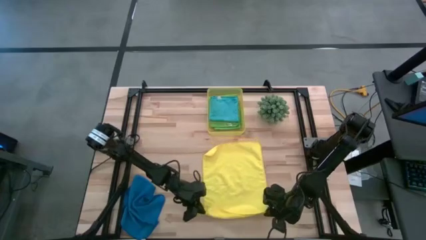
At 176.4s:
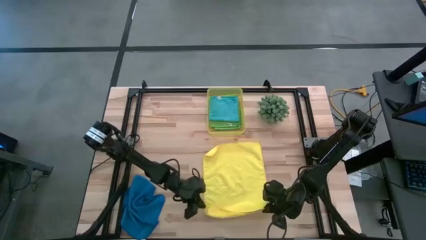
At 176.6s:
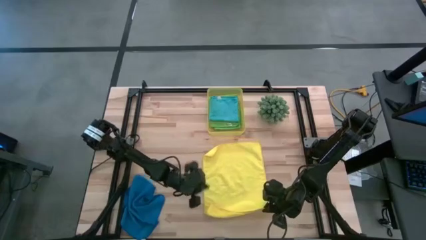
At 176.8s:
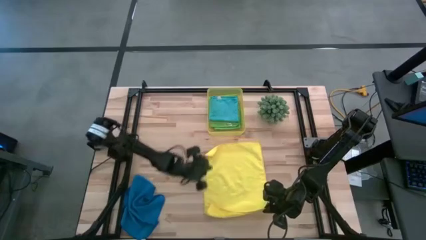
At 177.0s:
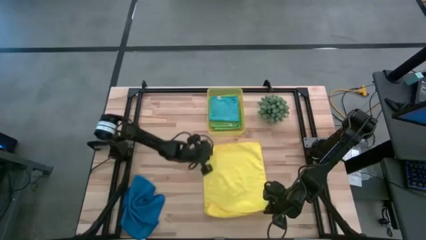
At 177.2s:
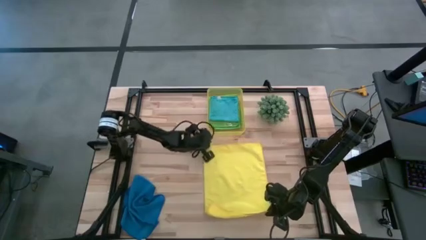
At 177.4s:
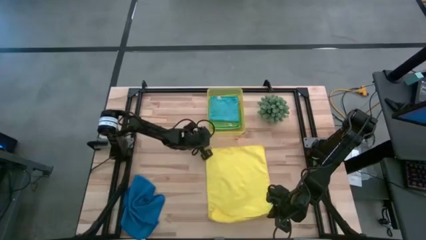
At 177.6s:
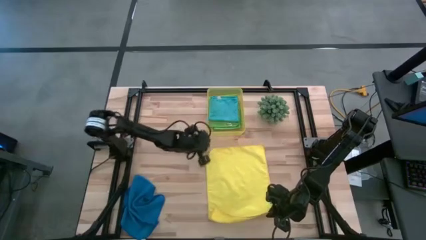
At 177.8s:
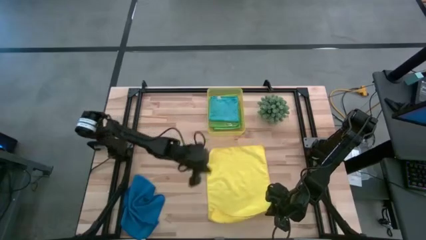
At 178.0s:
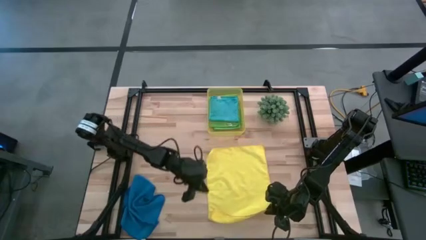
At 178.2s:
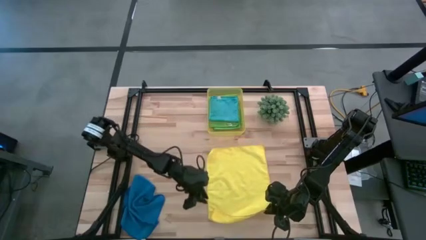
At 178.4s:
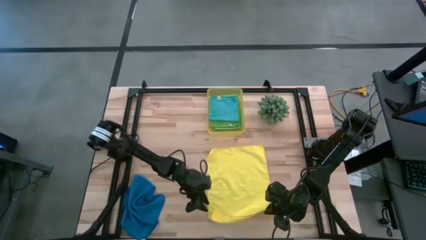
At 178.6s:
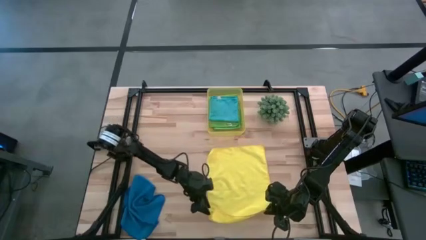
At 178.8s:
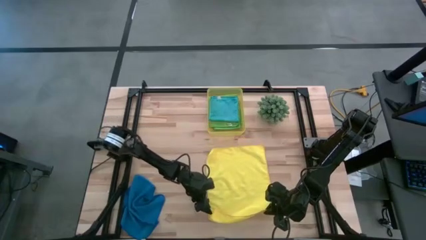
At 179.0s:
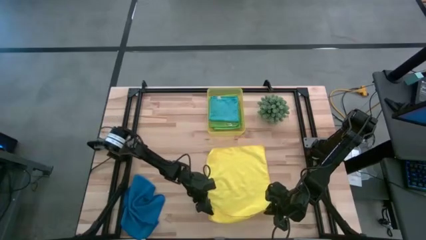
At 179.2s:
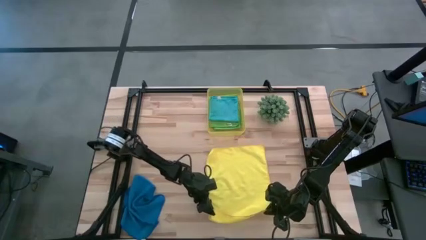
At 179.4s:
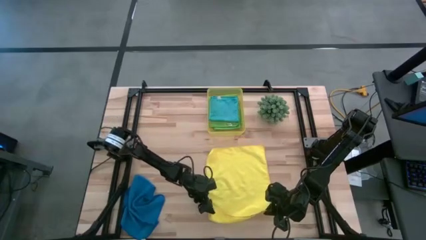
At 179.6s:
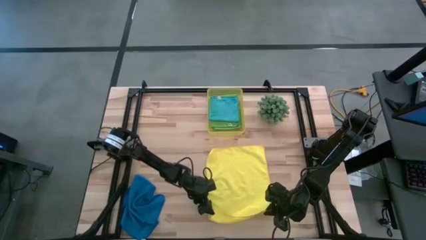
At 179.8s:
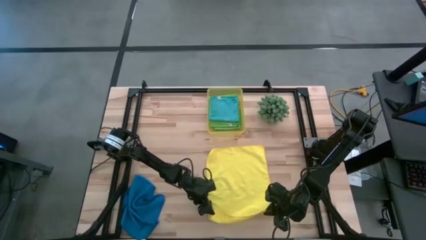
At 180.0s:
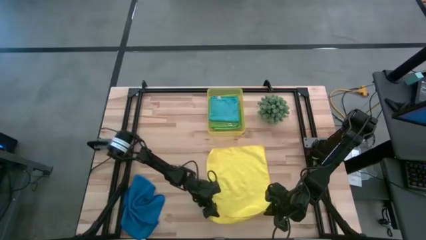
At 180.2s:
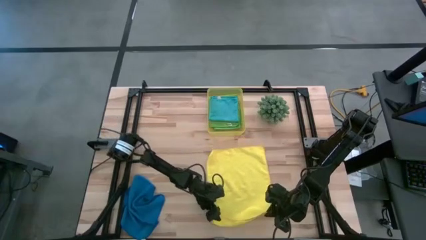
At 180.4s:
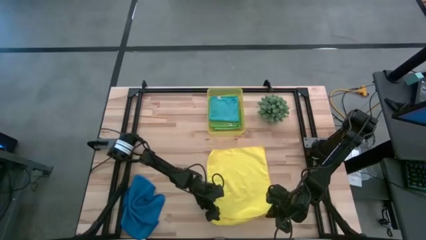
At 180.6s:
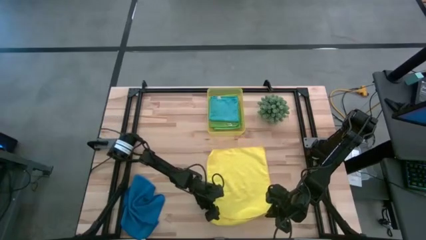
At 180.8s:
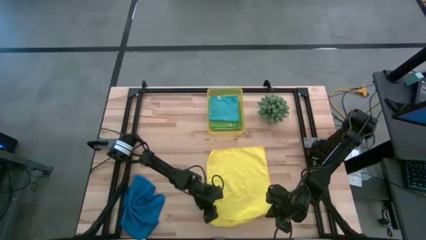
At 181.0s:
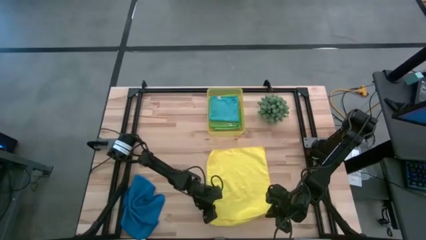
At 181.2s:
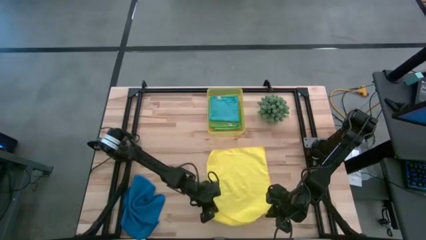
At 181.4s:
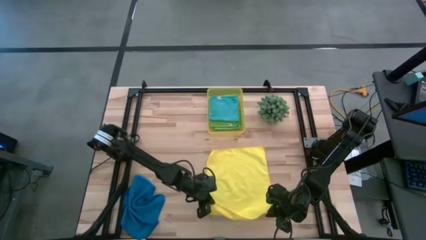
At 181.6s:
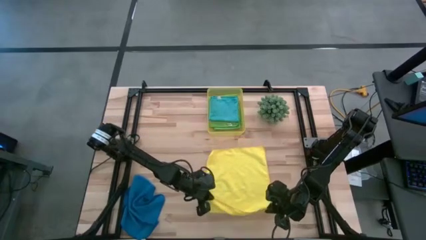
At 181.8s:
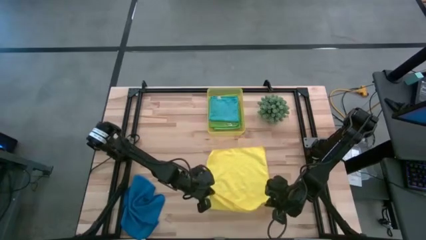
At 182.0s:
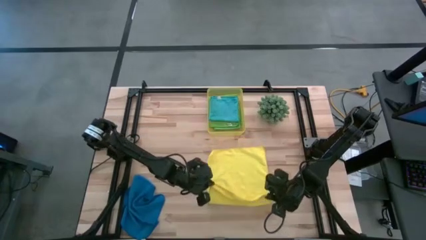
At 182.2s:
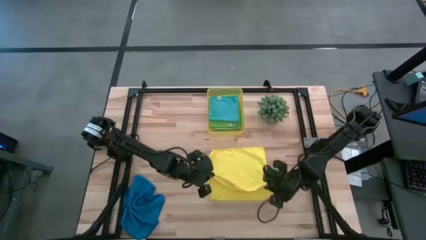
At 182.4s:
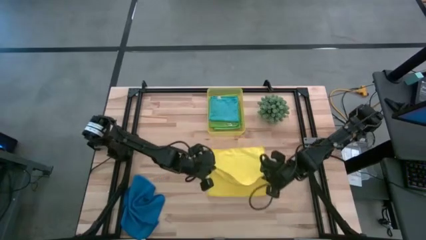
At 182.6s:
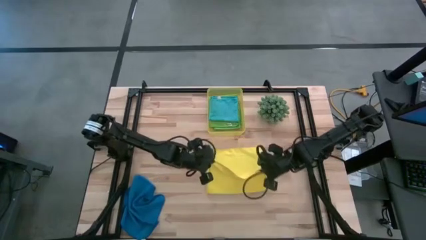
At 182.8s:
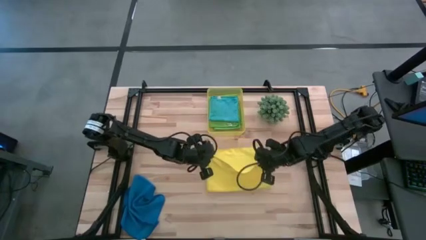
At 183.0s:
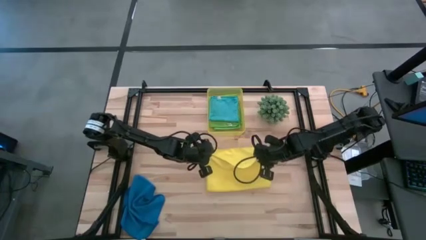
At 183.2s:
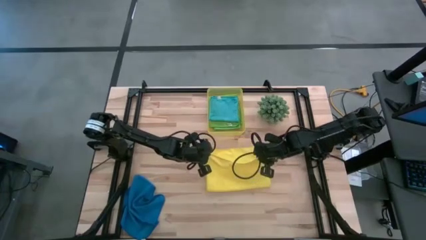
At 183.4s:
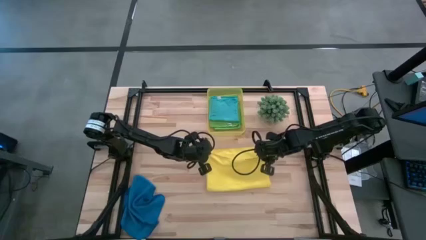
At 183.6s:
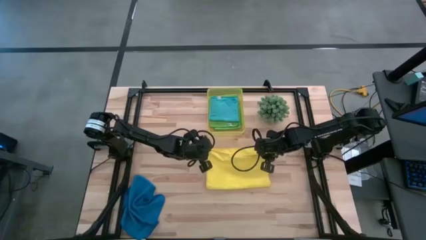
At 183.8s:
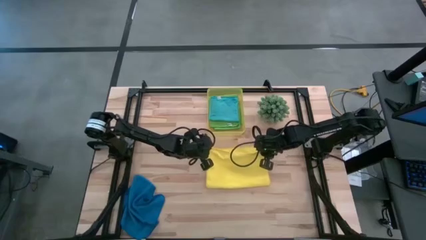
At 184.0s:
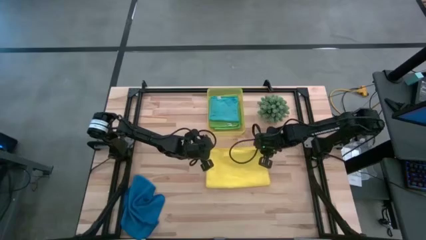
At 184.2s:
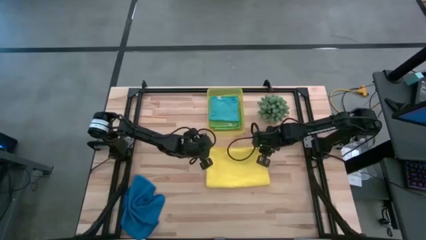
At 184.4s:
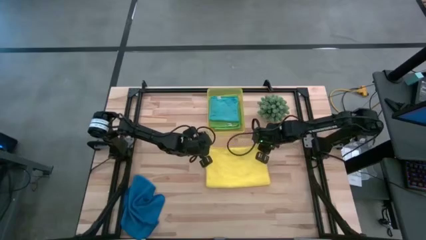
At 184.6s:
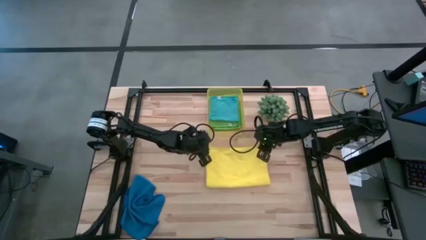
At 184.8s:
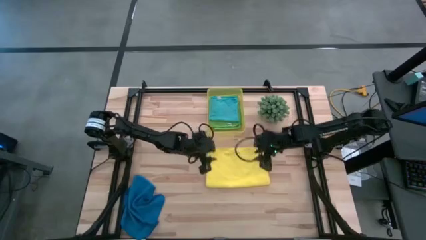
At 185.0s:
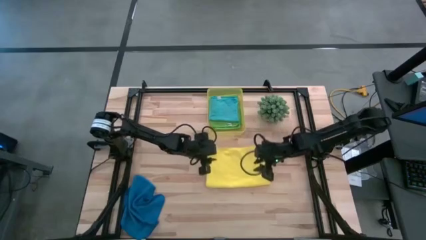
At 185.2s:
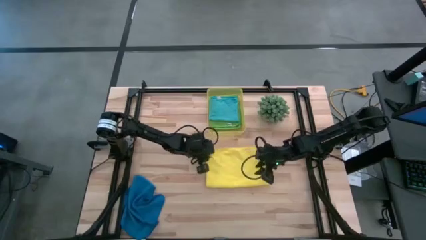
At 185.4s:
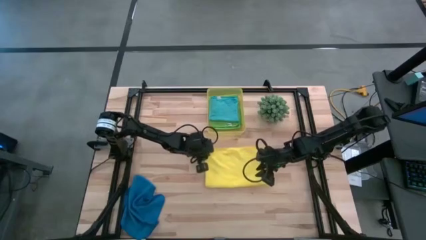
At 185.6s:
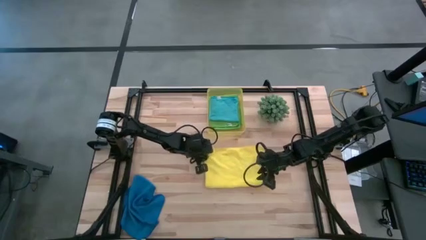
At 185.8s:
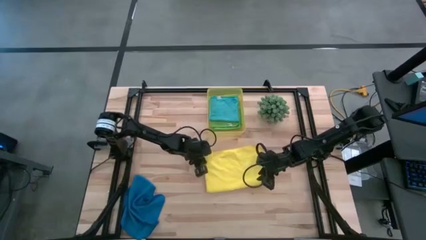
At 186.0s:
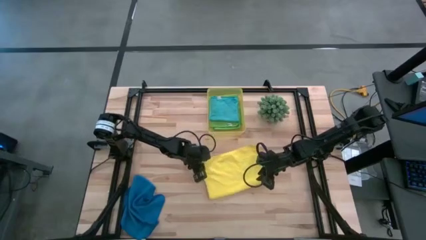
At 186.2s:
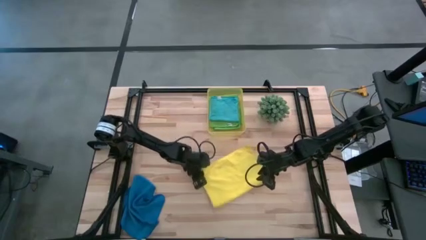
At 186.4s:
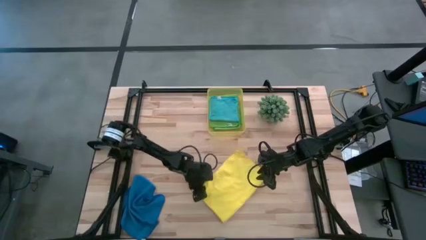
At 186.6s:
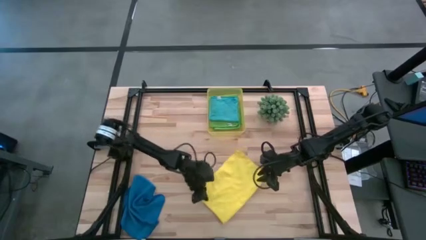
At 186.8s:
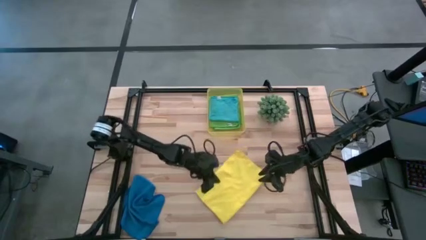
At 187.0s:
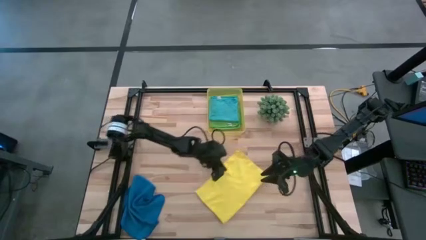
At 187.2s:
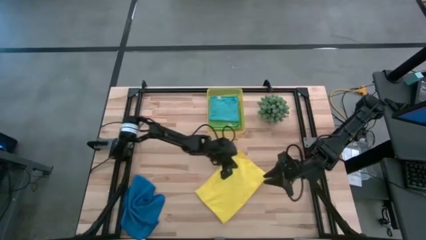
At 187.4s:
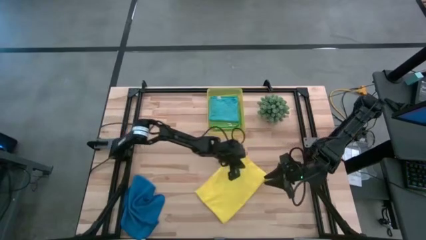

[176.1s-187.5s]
Task: Fold microfiber towels
Fold the yellow microfiber cloth

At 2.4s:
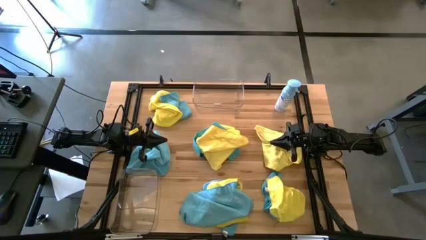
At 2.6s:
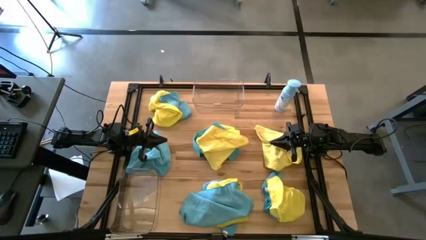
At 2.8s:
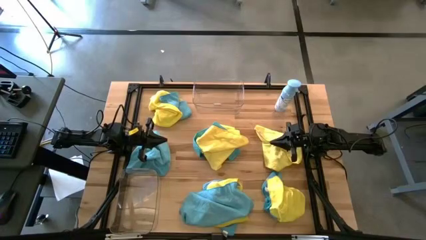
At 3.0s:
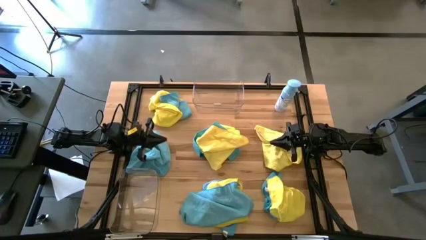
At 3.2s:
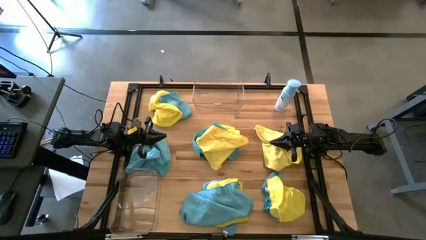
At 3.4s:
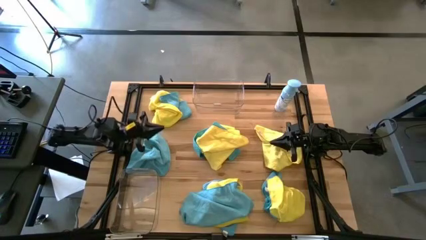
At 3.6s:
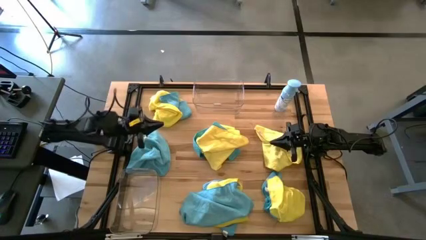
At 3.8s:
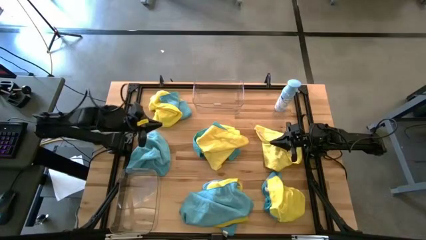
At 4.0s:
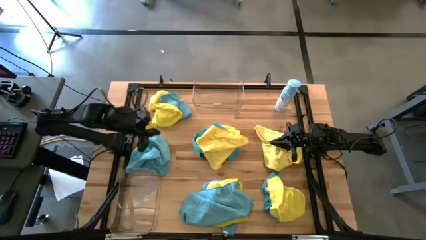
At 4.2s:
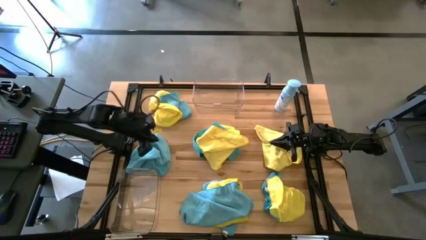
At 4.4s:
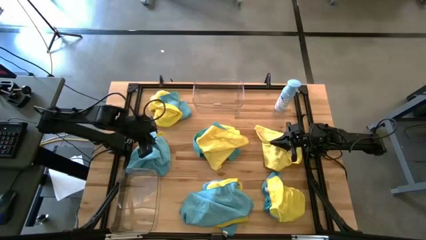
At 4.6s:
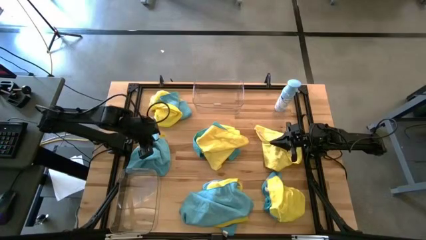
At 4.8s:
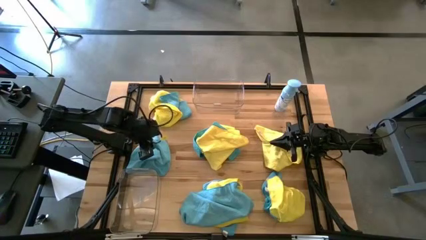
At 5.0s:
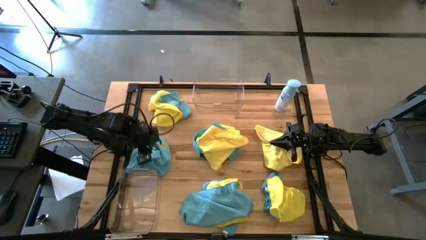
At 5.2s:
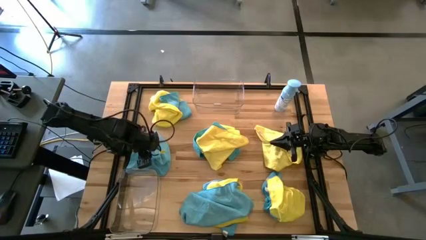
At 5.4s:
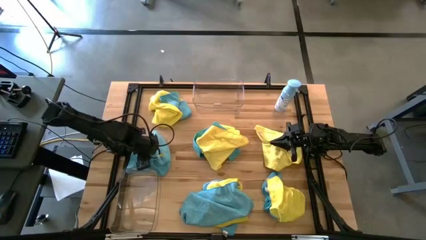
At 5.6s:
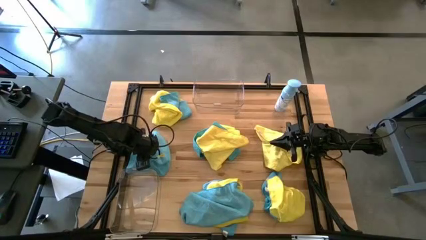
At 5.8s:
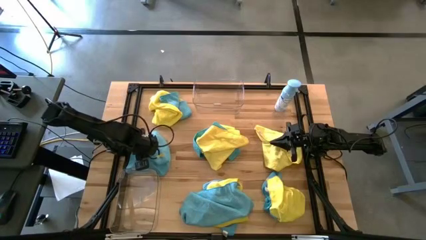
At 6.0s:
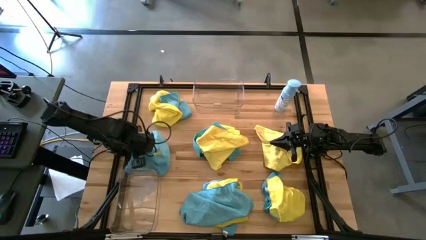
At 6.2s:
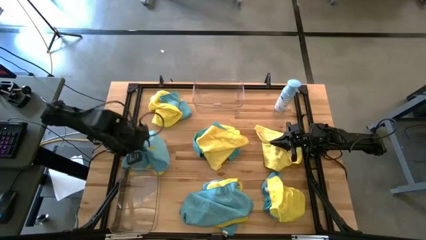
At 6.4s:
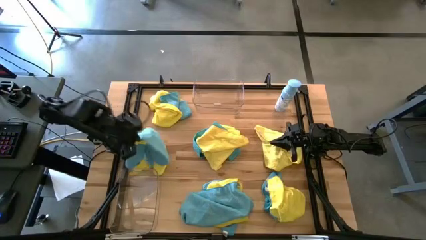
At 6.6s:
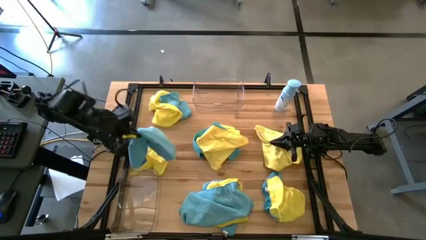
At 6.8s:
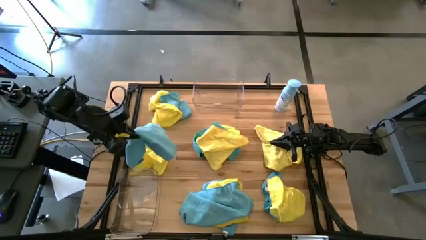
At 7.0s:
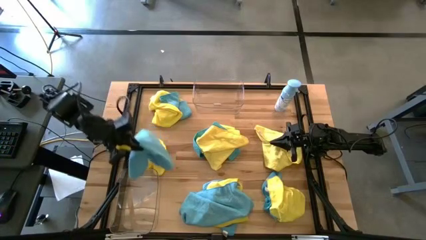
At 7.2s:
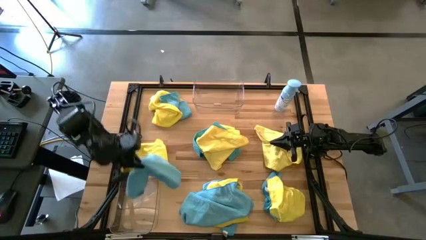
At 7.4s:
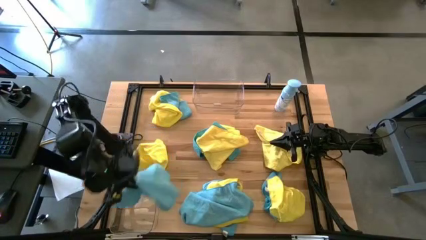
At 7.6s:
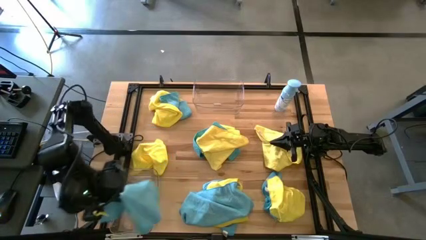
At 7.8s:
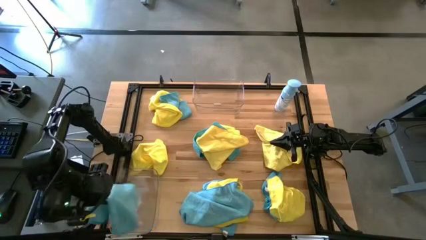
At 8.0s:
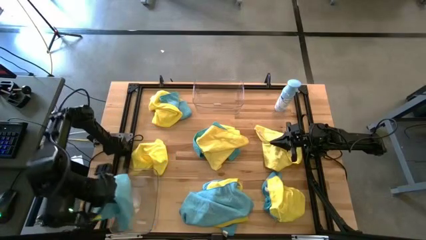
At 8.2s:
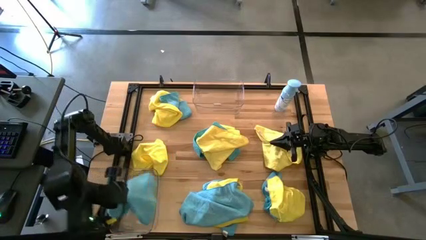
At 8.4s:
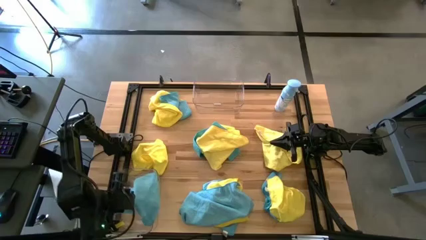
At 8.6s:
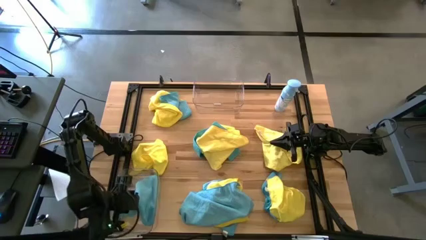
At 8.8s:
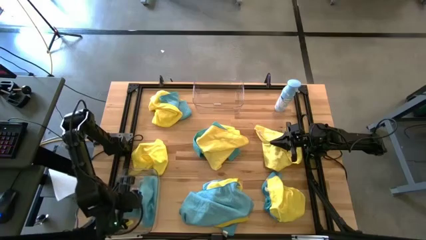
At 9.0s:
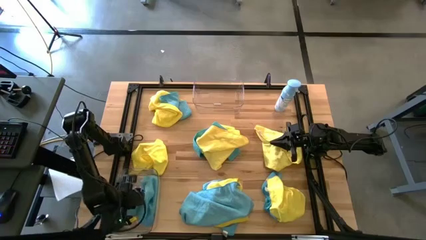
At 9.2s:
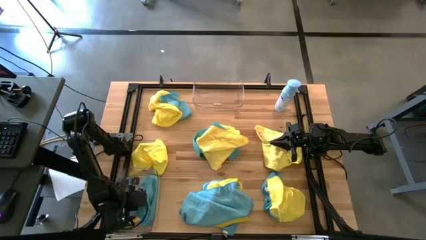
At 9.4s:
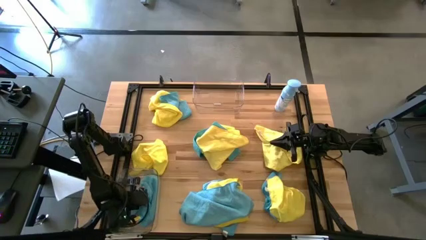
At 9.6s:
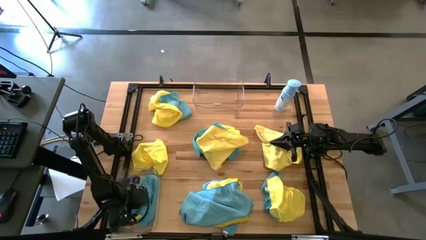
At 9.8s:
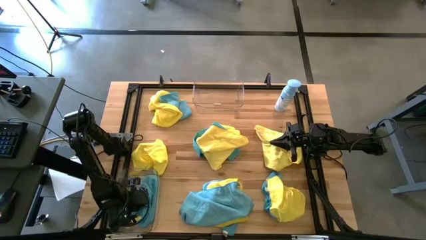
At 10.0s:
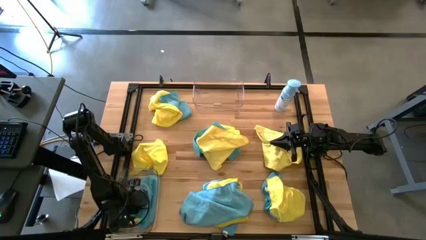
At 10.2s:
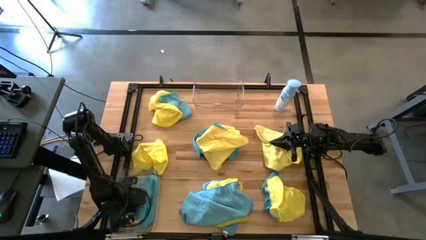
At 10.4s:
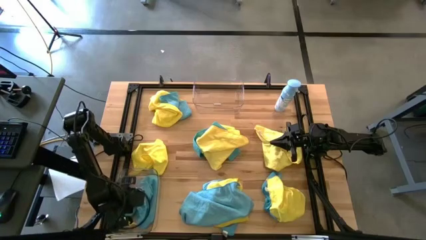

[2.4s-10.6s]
Task: Sort microfiber towel by color & place in baskets
Put the blue microfiber towel into the bottom transparent bin
